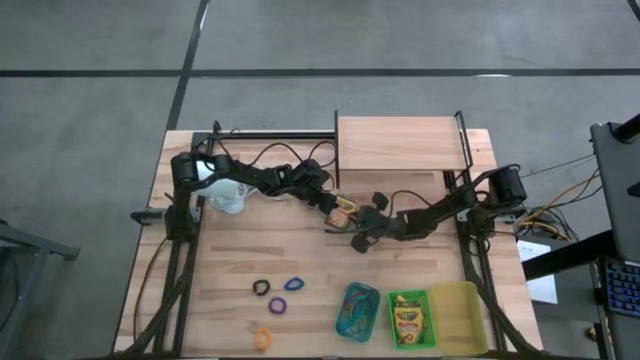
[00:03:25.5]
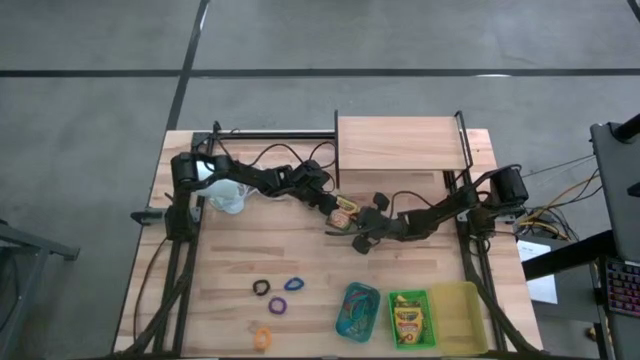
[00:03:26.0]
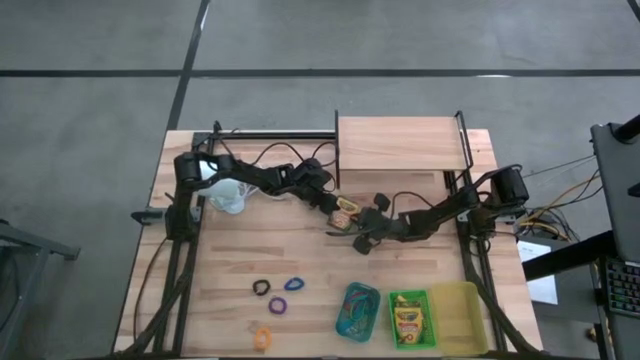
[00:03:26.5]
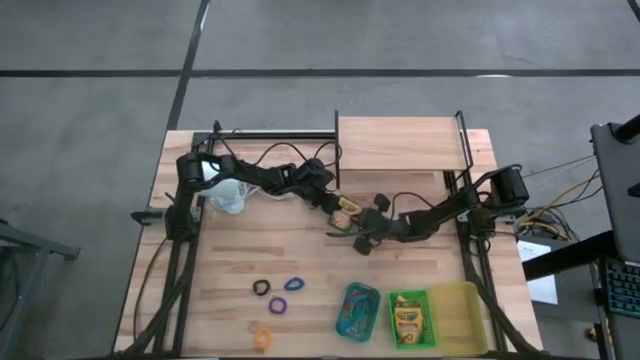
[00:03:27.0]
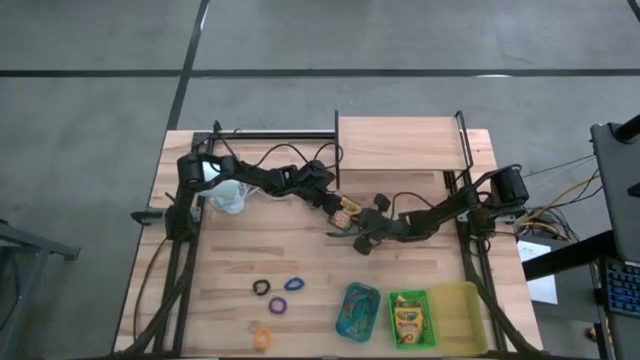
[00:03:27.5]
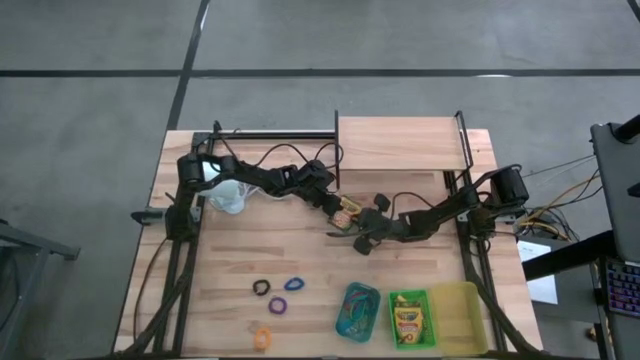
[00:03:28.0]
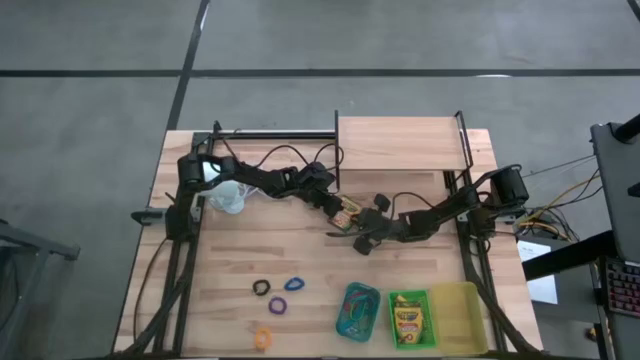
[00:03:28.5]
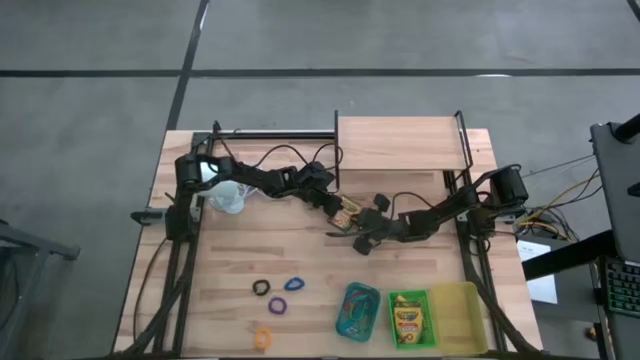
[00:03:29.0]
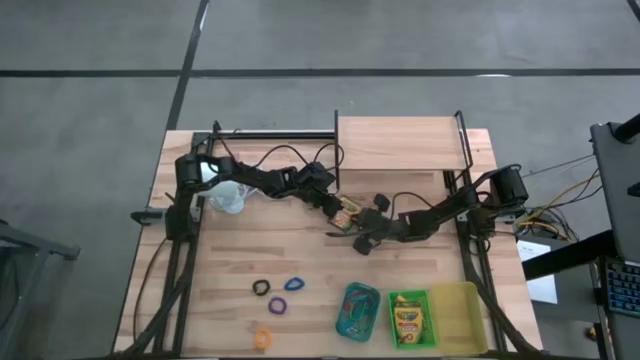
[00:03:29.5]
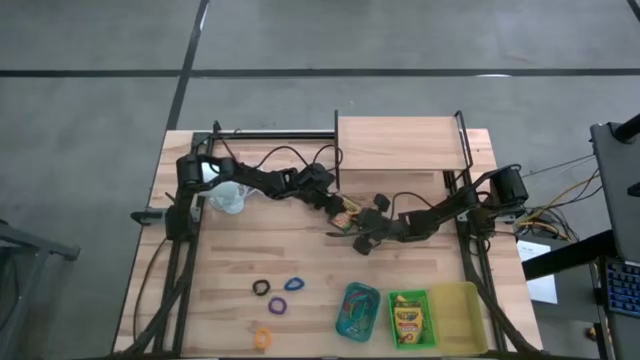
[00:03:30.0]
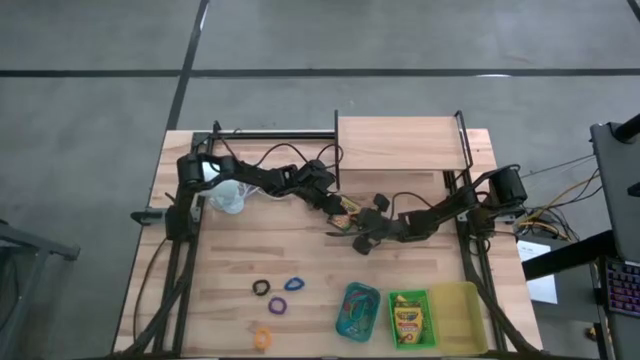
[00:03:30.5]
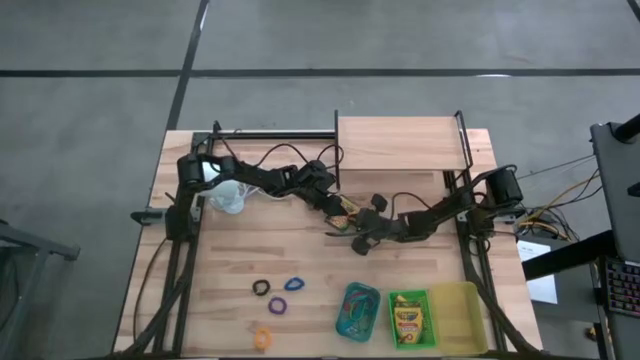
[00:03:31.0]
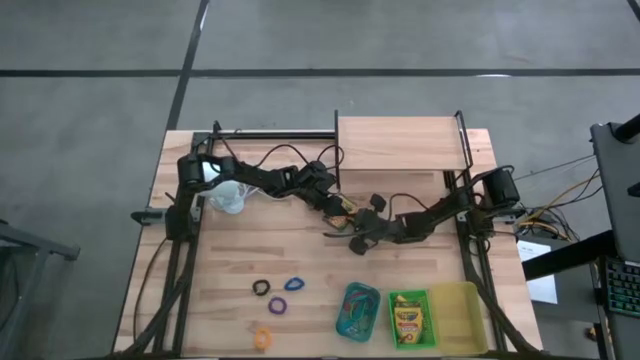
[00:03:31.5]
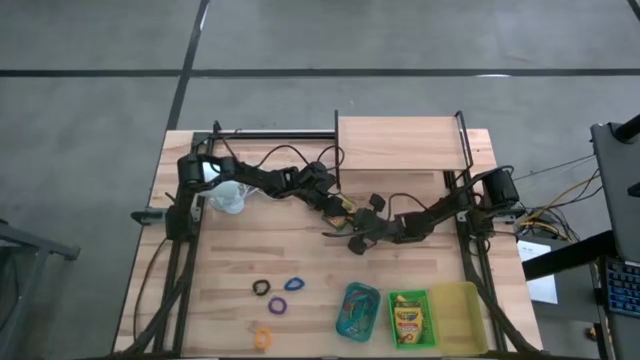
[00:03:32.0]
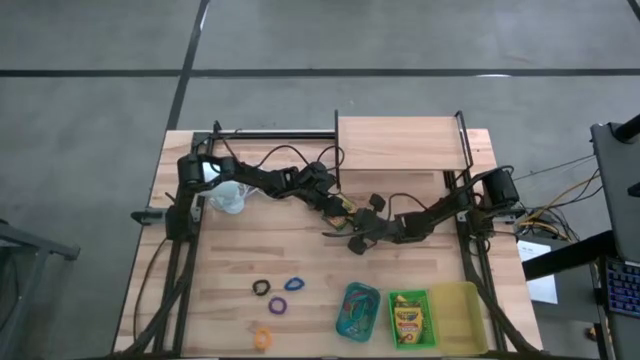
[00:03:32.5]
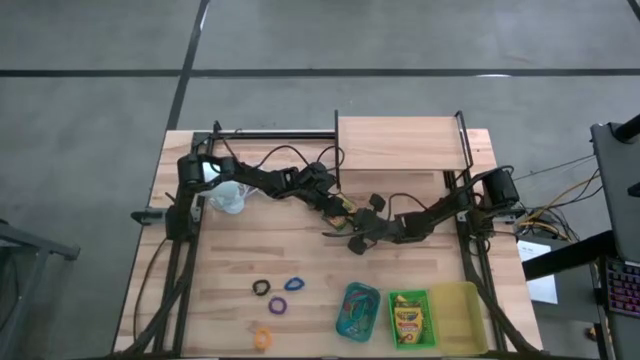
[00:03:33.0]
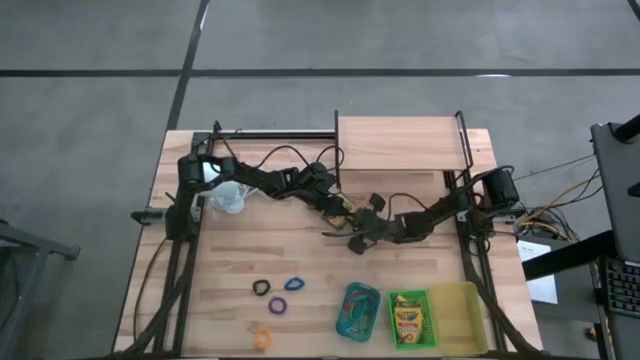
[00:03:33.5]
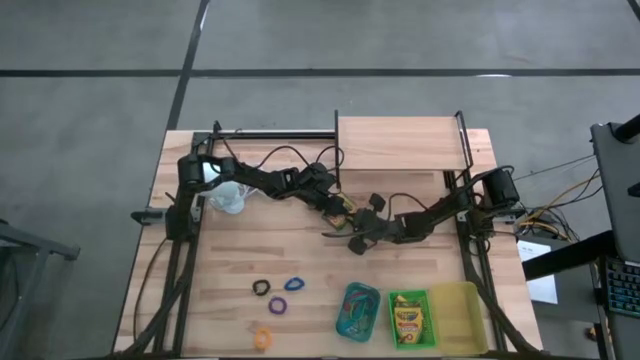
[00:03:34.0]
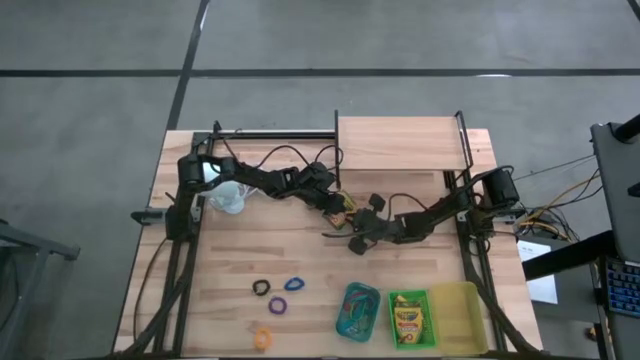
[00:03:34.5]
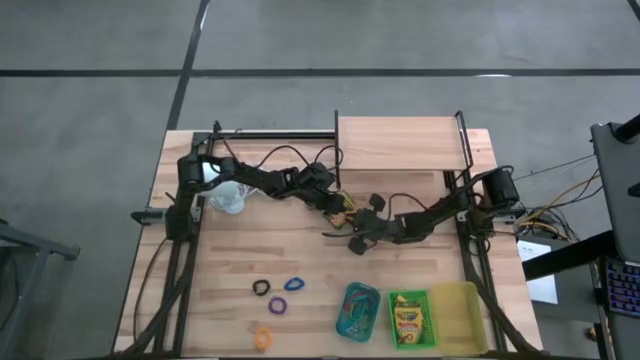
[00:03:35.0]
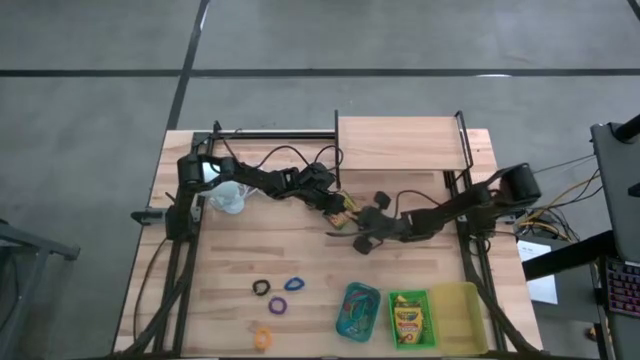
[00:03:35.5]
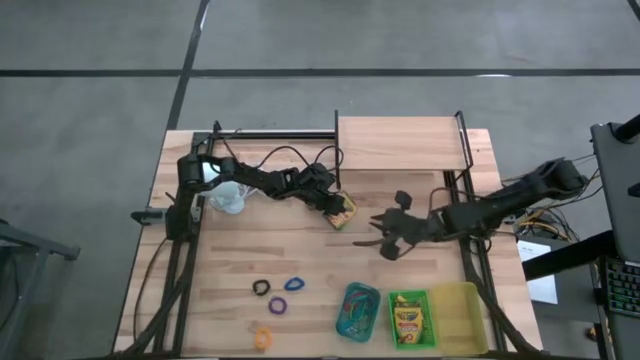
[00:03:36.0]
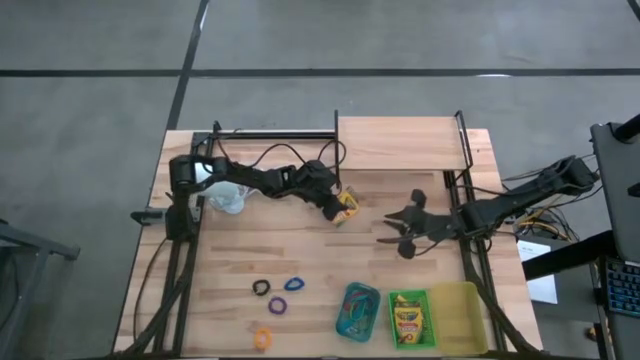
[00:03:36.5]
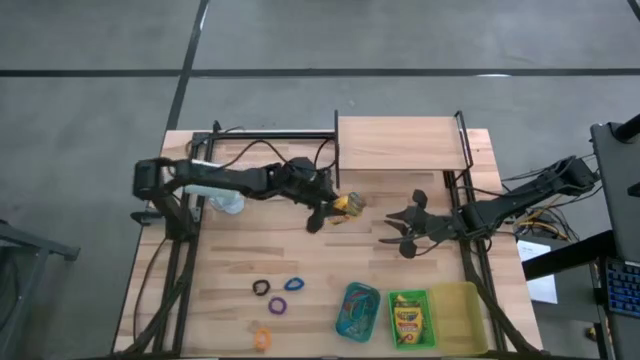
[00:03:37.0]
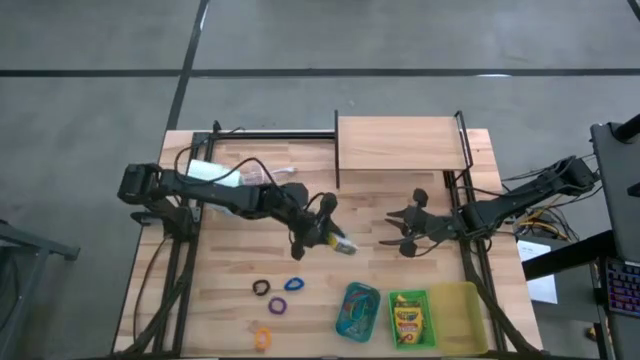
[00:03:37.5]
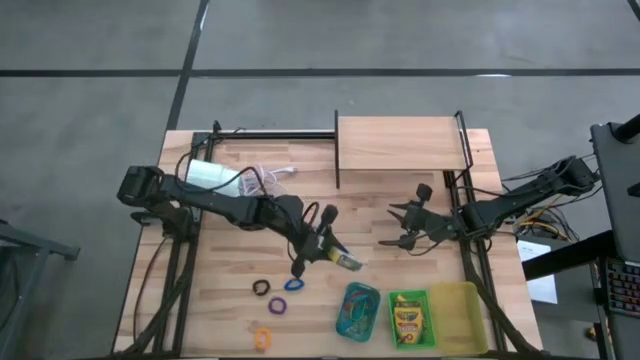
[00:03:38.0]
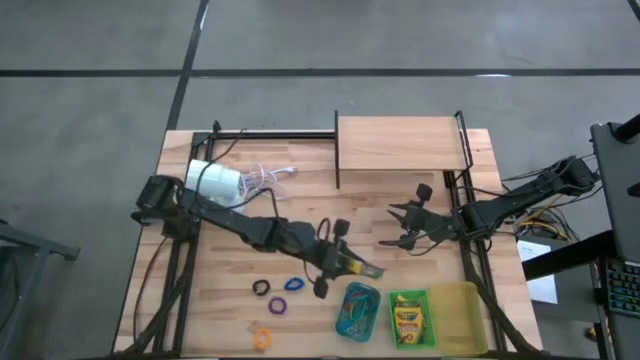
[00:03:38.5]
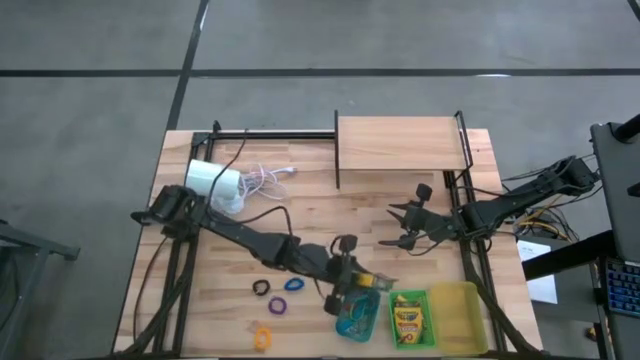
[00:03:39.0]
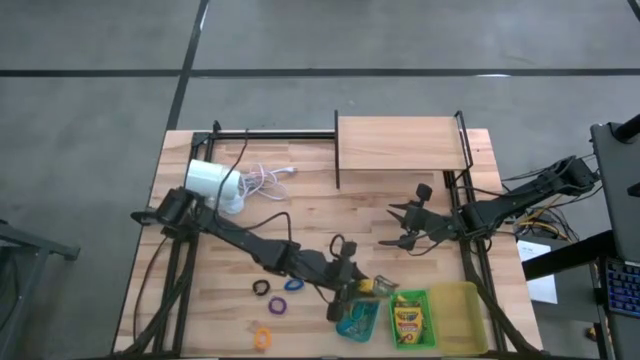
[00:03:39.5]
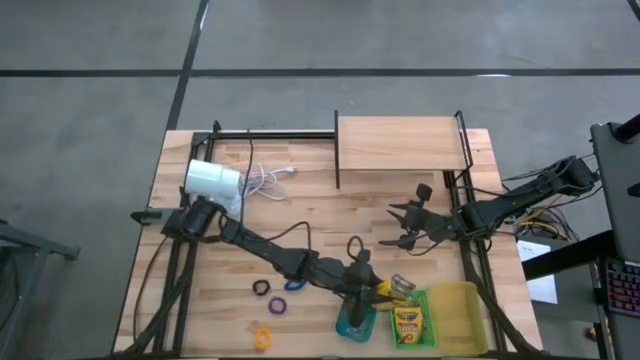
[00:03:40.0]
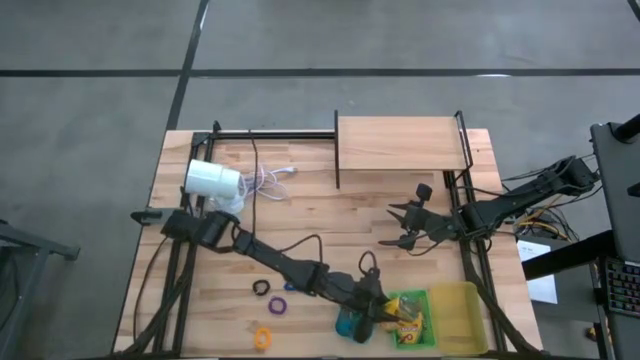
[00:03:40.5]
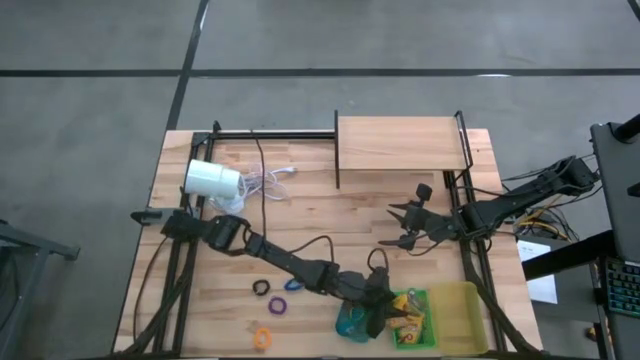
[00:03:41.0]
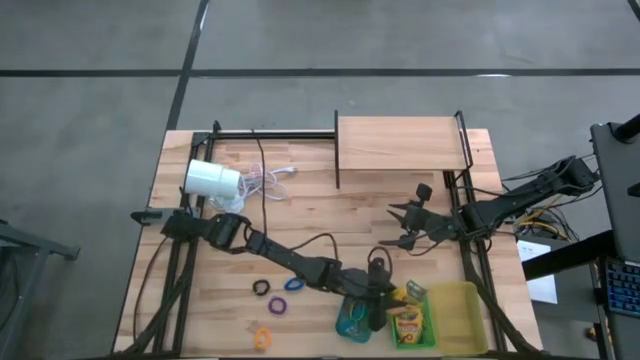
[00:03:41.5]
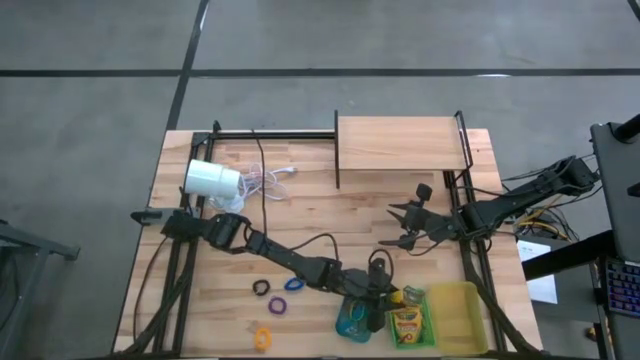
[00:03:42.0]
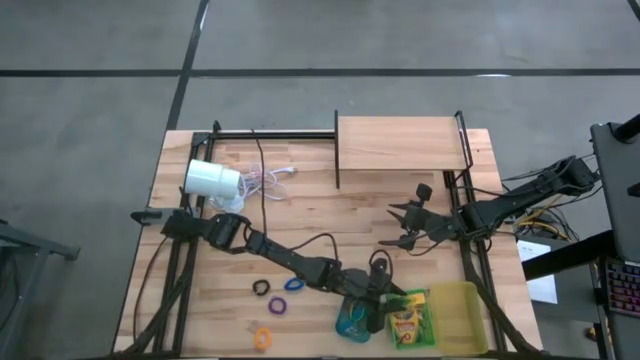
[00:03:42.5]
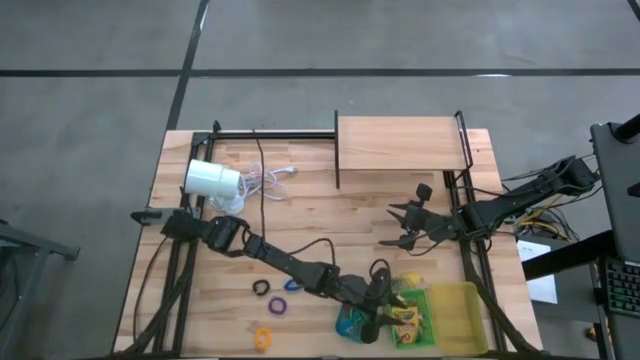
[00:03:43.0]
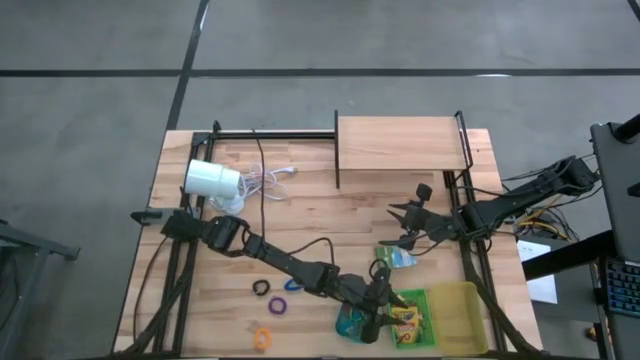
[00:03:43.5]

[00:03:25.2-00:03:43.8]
Task: Pick & Place Office Desk Supplies
Put the crayon box into the green bin

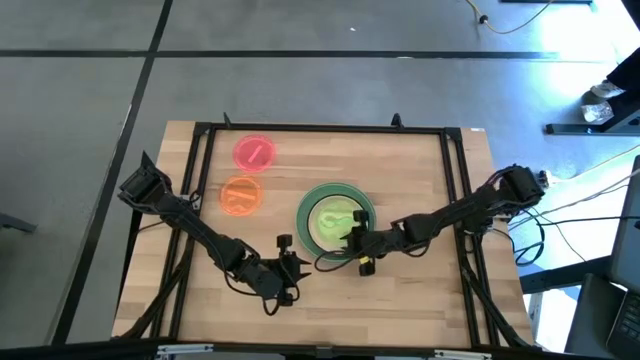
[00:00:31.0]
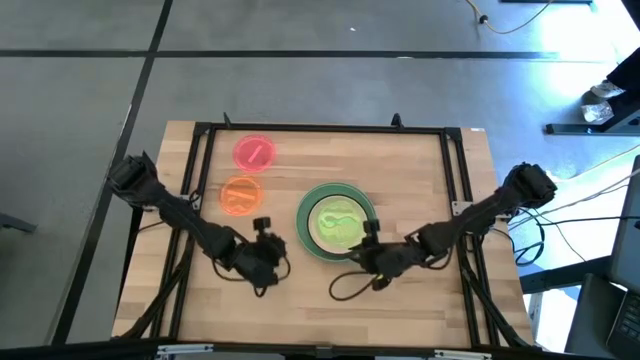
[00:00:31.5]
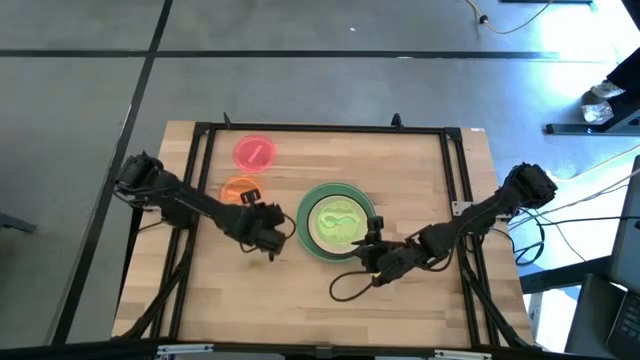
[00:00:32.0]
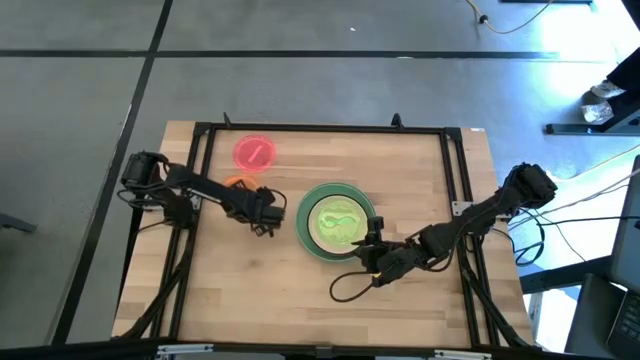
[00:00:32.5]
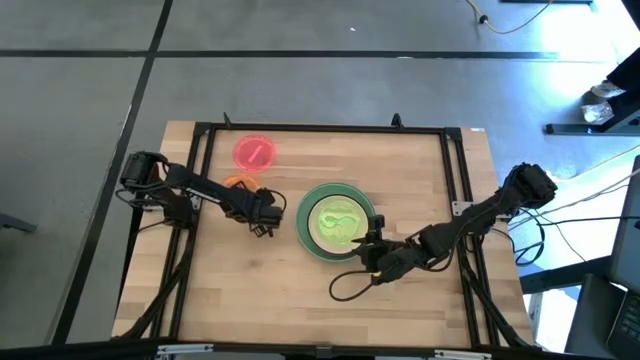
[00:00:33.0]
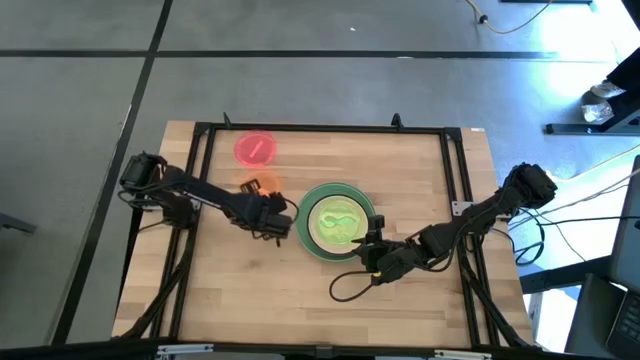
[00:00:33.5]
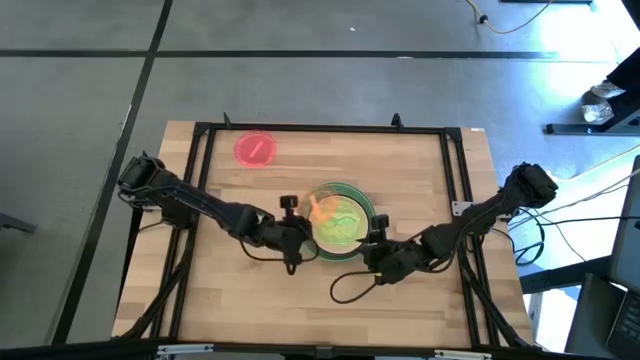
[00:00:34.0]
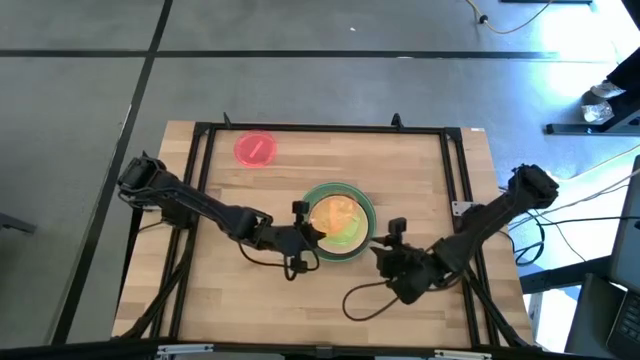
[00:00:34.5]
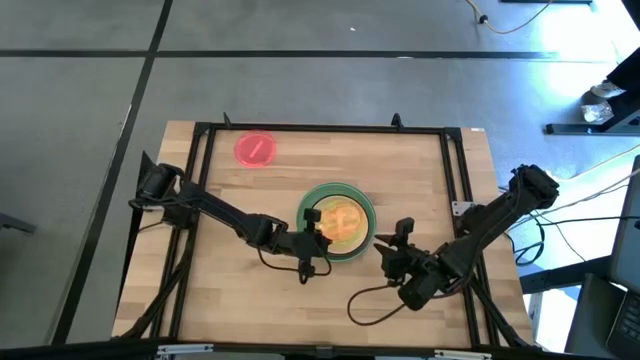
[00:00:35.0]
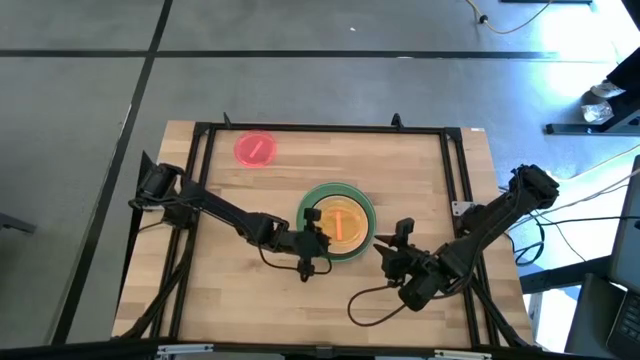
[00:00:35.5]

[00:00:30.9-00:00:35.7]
Task: Stack plastic plates
Stack the transparent orange plate on top of the transparent green plate
